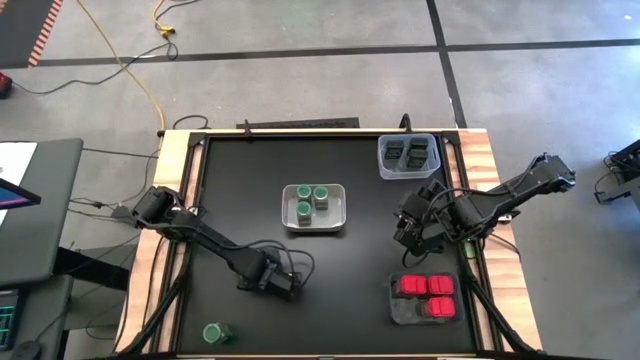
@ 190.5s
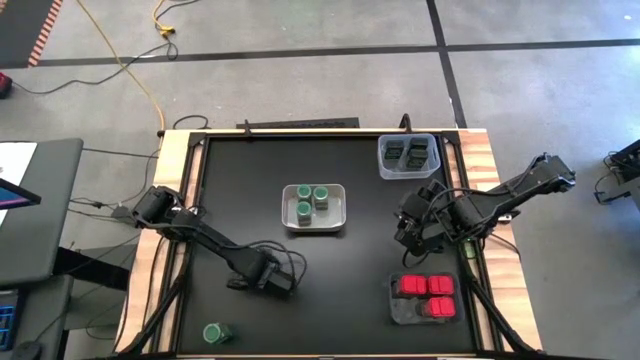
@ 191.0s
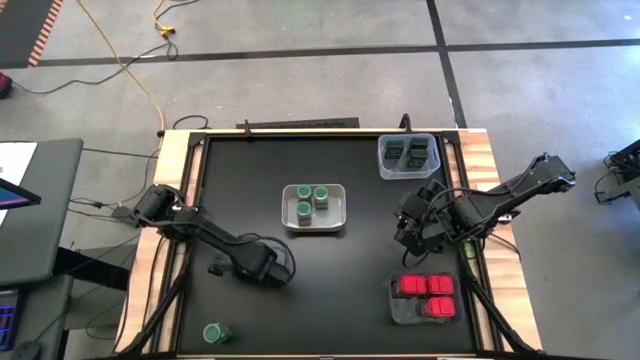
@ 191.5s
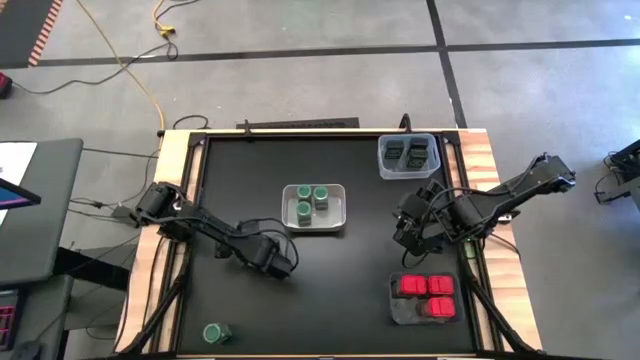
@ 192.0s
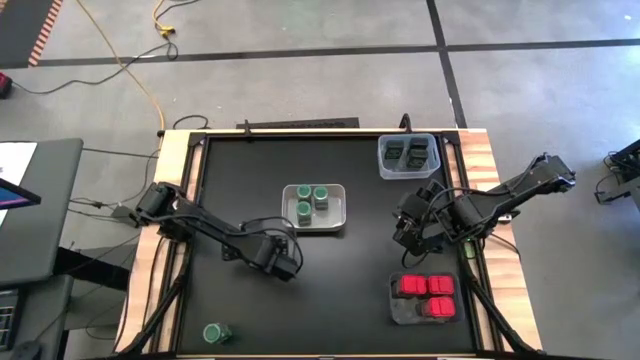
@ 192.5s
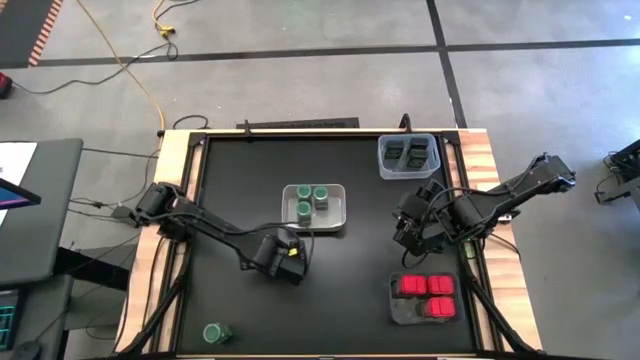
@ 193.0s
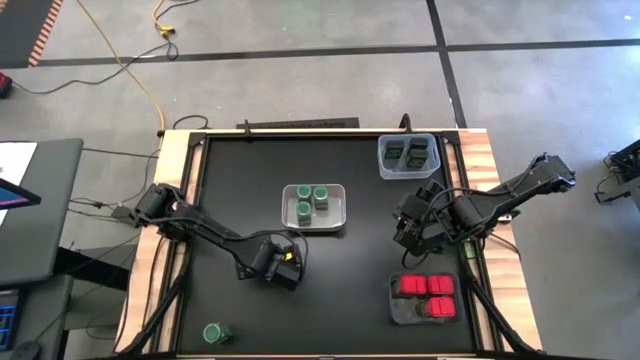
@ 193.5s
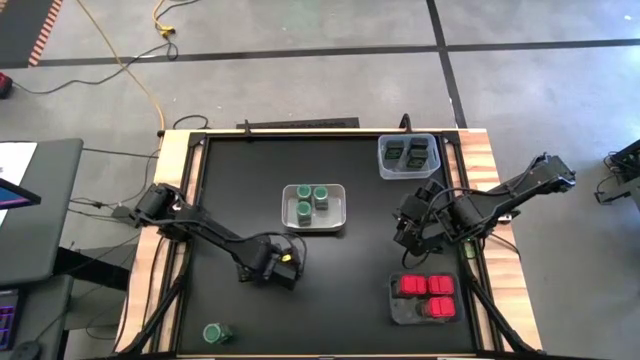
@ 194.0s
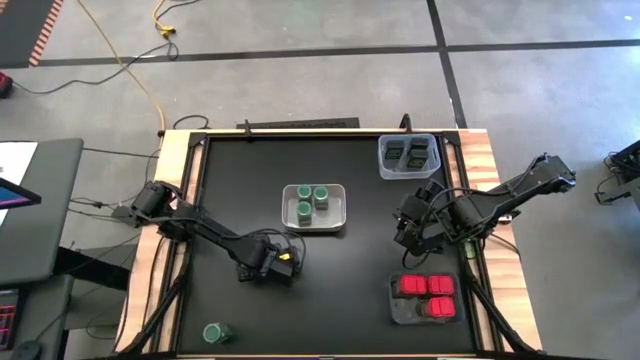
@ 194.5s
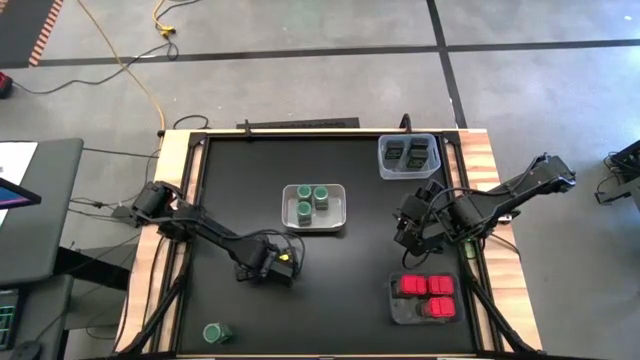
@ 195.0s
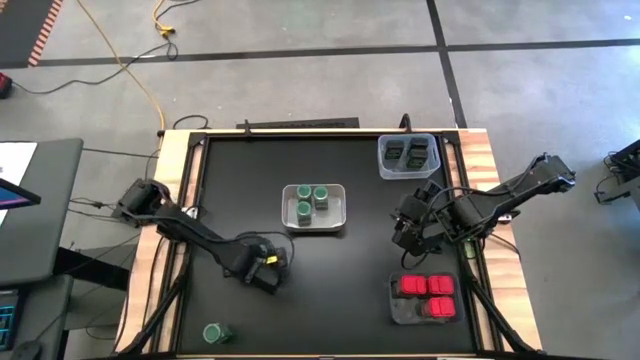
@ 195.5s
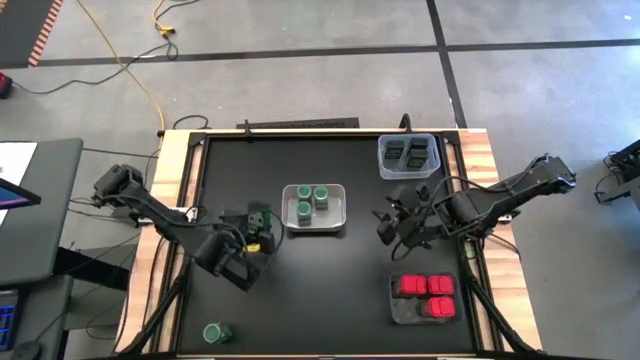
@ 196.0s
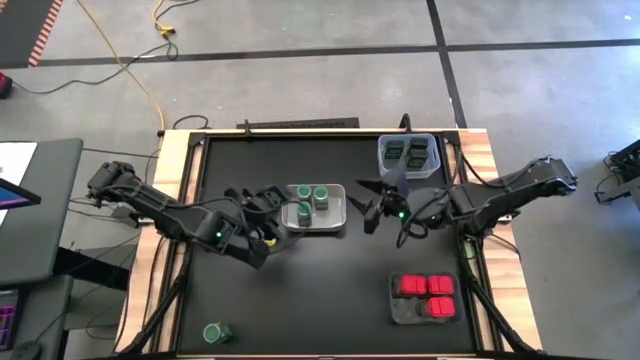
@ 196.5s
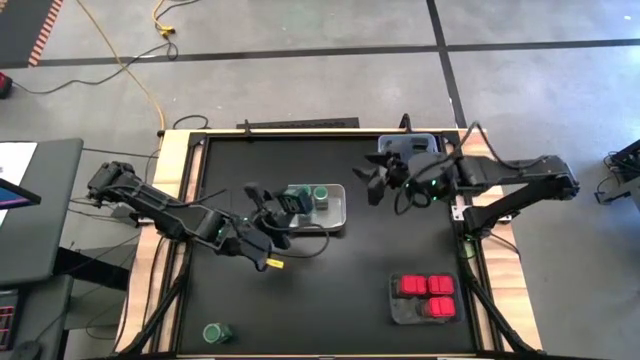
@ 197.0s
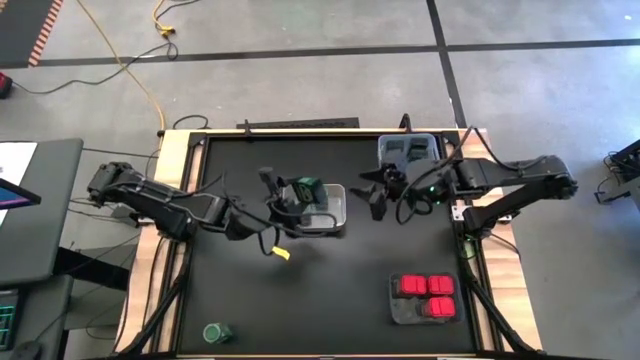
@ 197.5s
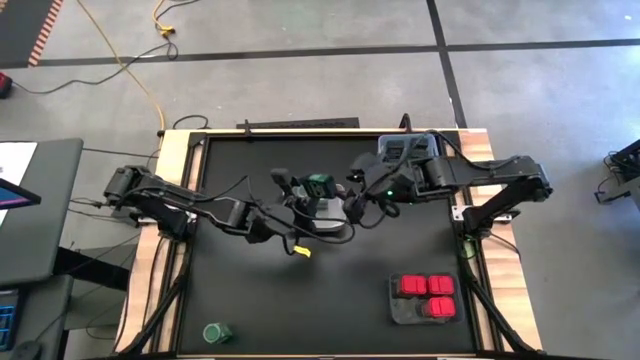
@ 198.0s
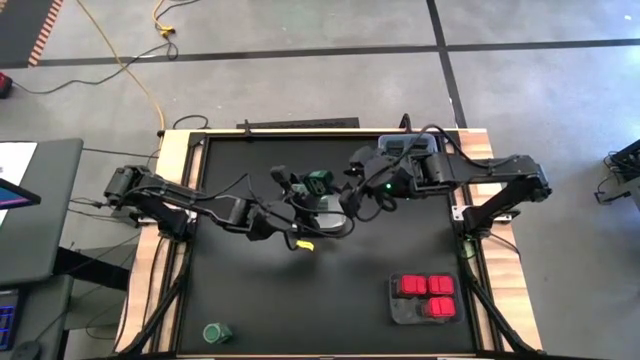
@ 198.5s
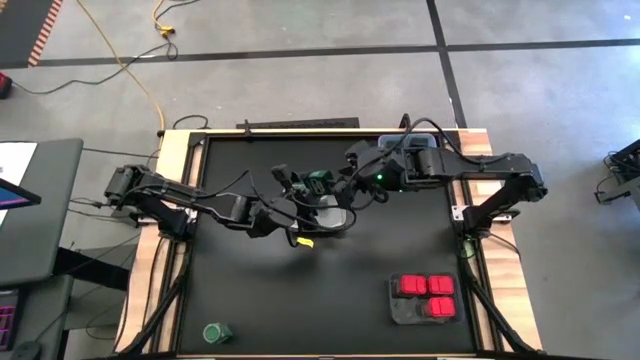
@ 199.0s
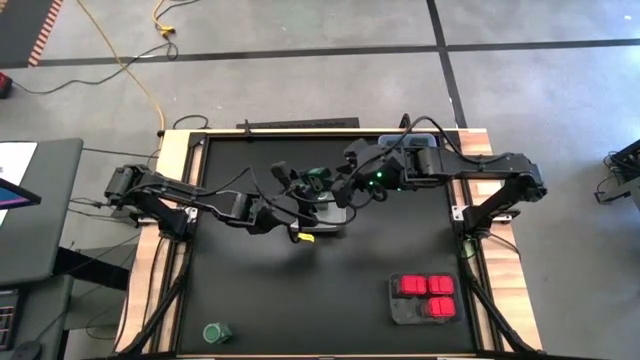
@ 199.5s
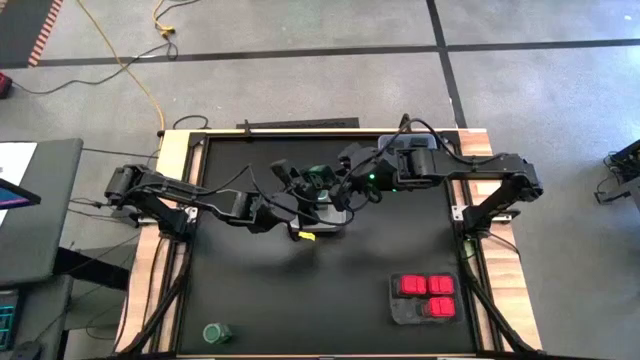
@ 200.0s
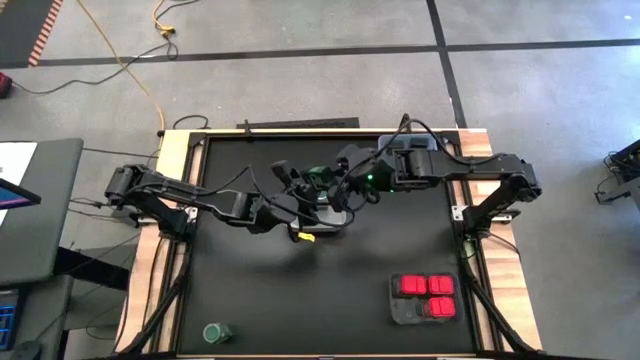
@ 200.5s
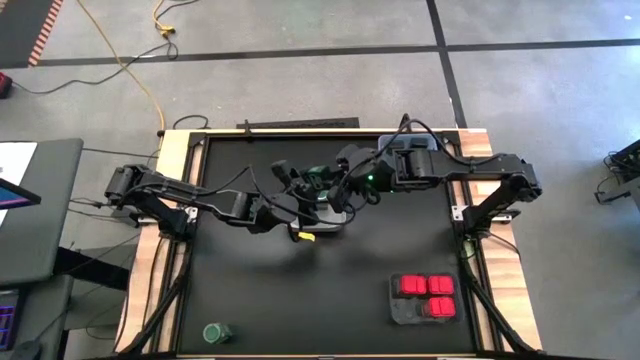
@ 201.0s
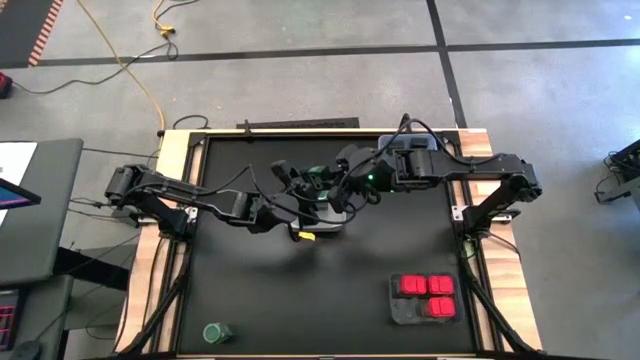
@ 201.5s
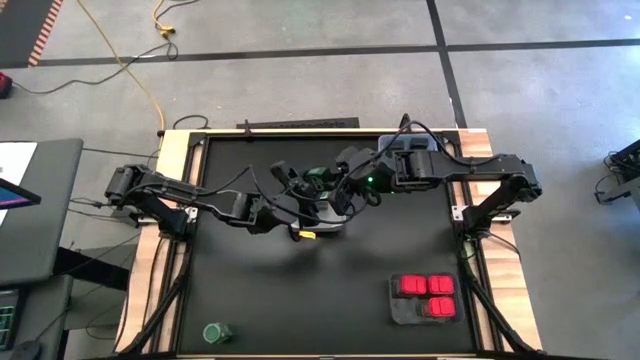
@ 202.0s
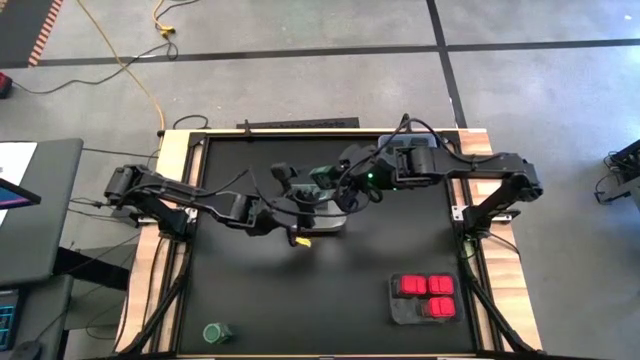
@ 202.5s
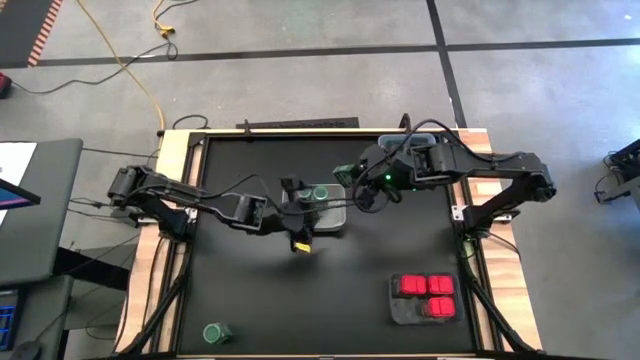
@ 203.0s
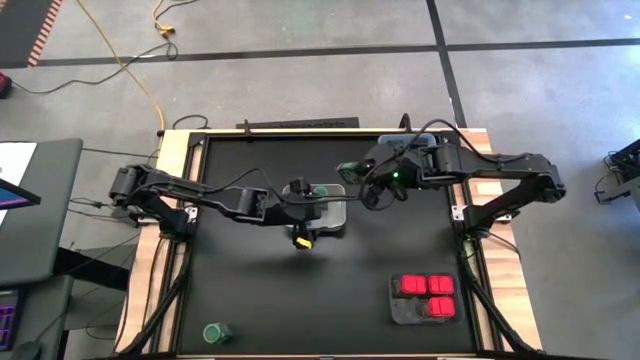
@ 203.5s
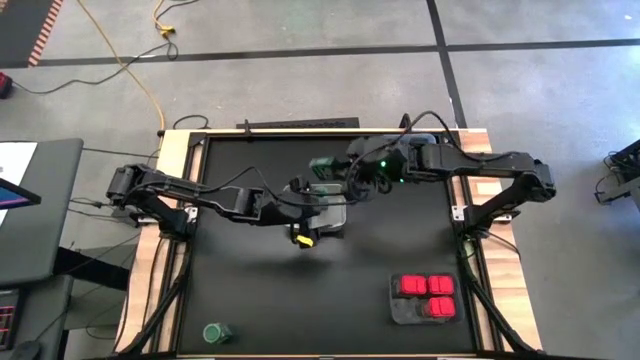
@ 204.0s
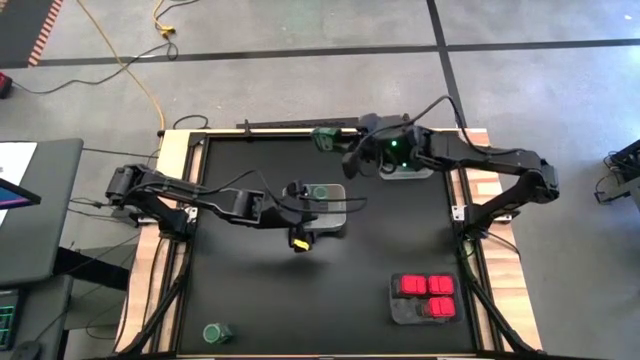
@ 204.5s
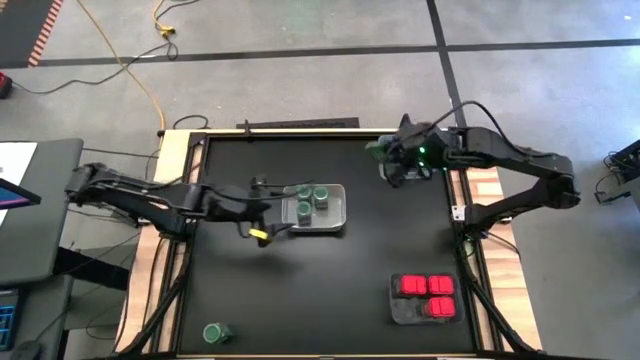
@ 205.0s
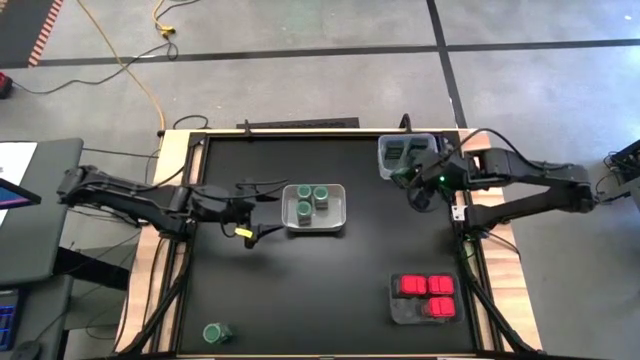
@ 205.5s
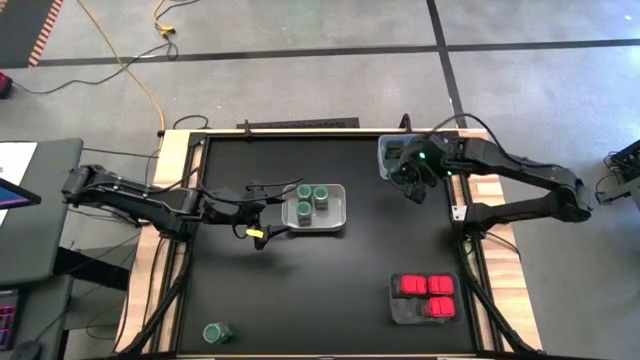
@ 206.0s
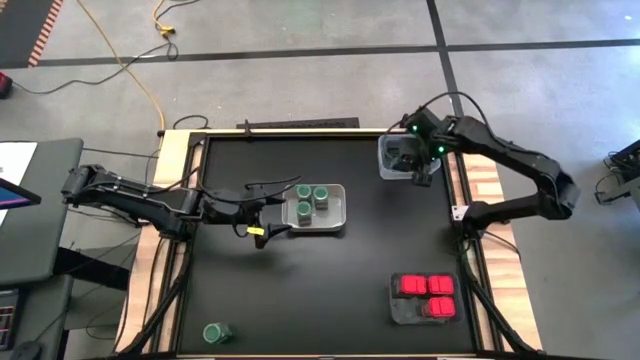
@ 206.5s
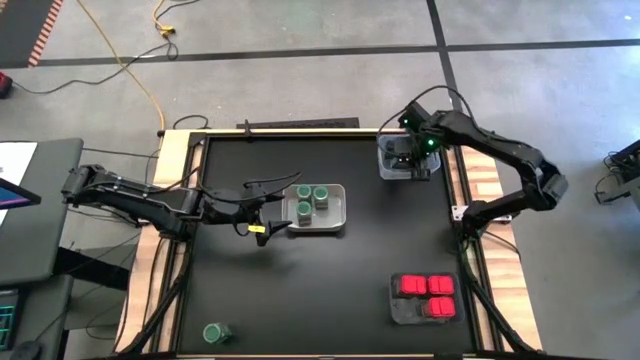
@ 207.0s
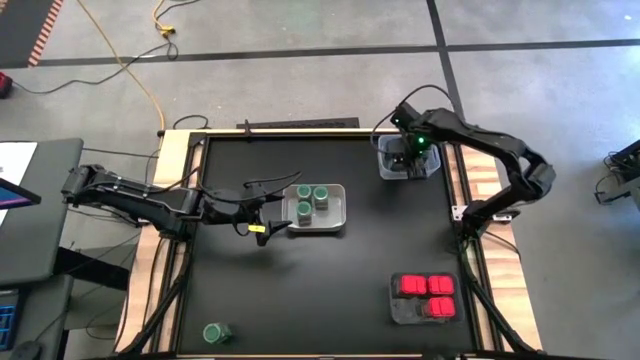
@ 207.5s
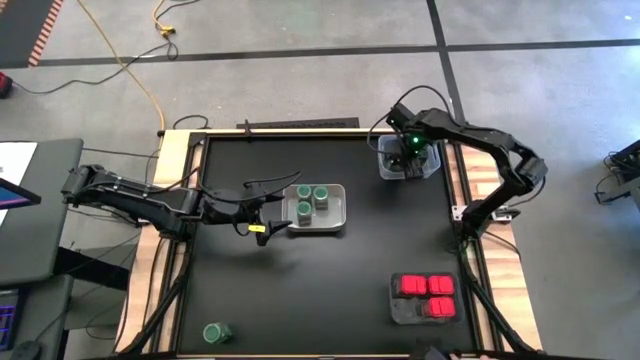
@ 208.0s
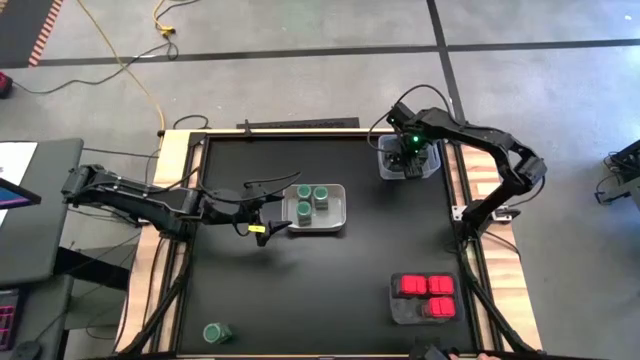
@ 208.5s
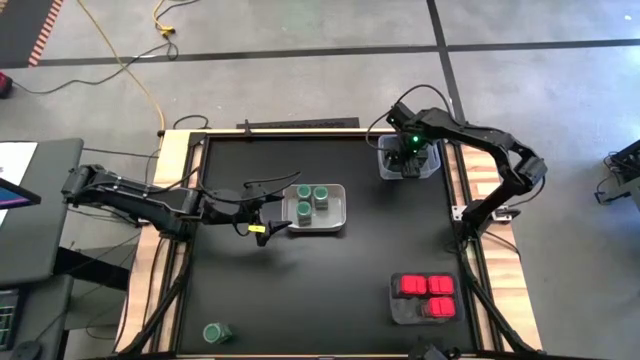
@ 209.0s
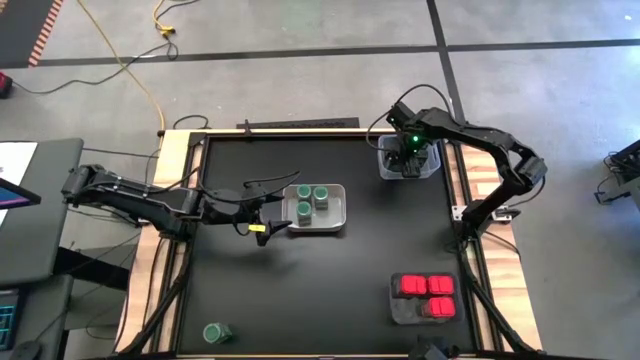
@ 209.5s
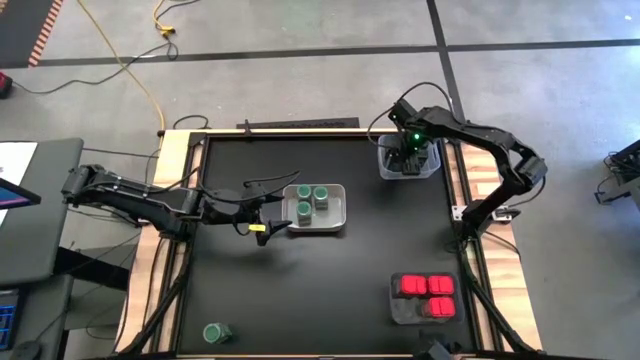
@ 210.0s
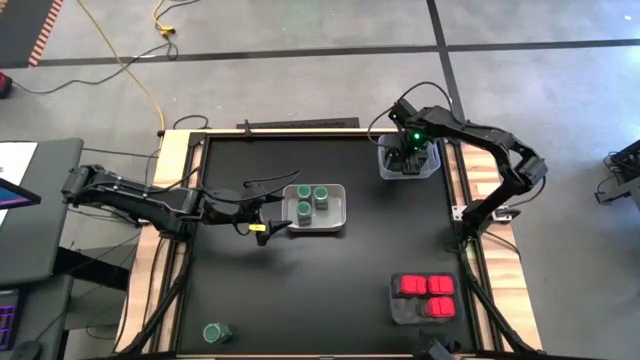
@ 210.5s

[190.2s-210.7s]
Task: Sort spices by type
Put the black seasoning can into the transparent bin
